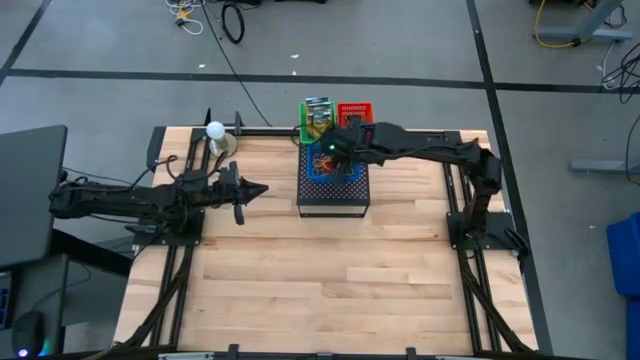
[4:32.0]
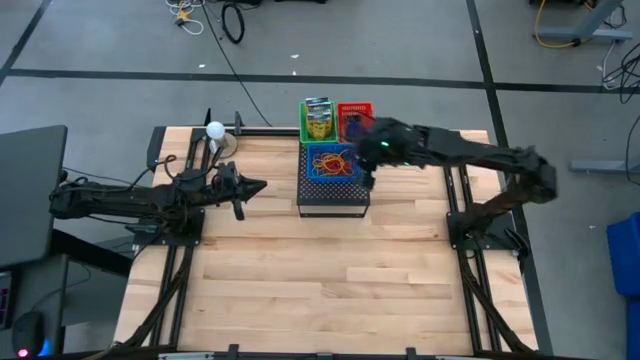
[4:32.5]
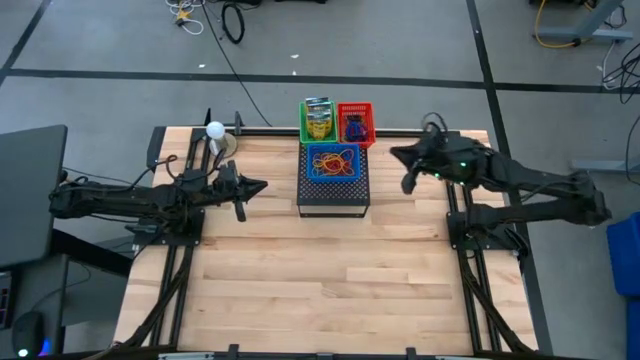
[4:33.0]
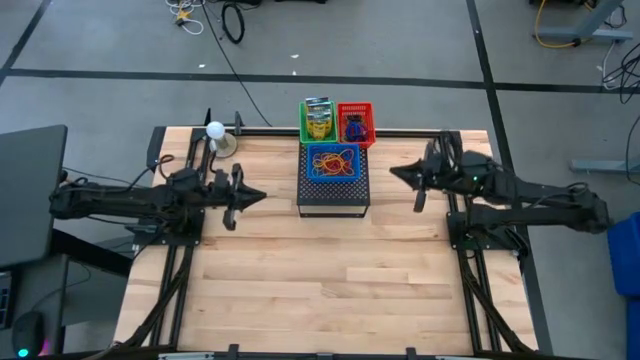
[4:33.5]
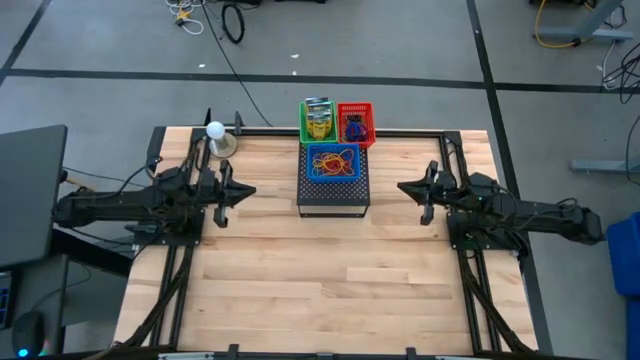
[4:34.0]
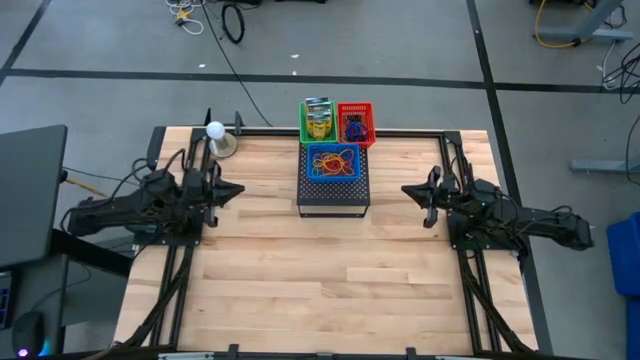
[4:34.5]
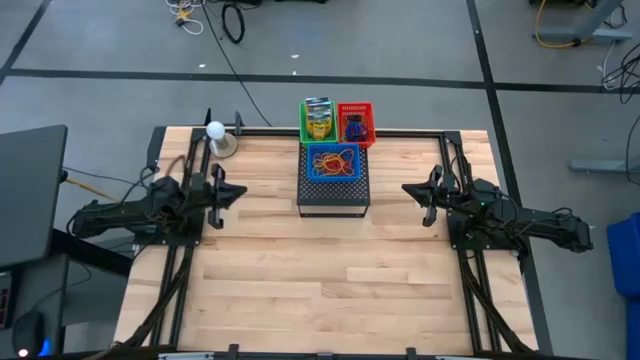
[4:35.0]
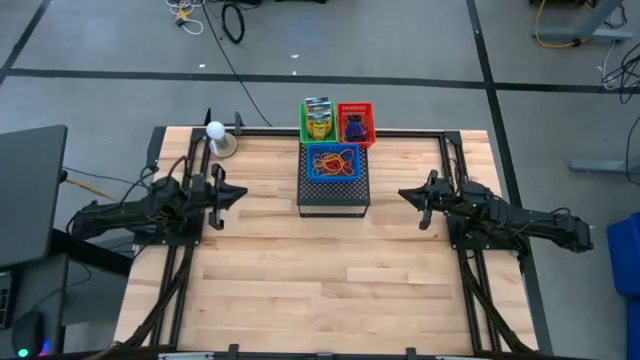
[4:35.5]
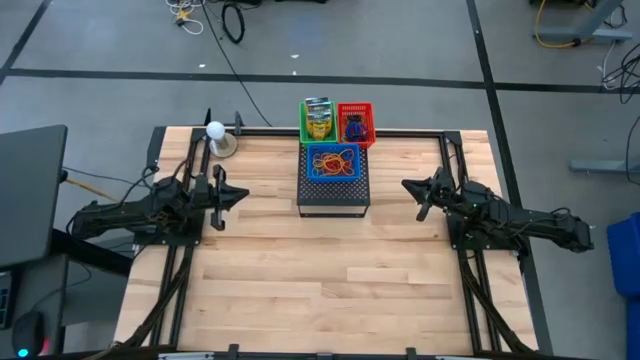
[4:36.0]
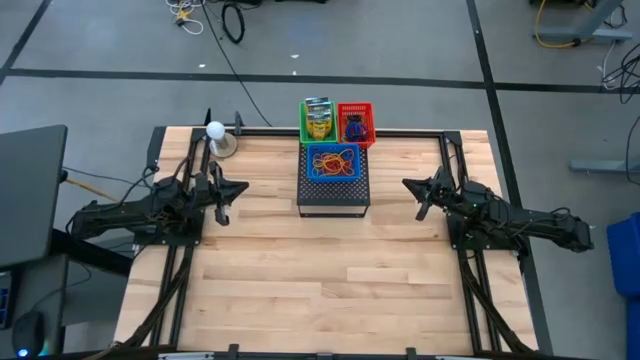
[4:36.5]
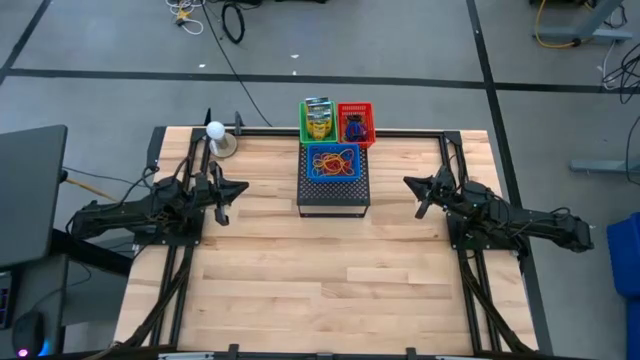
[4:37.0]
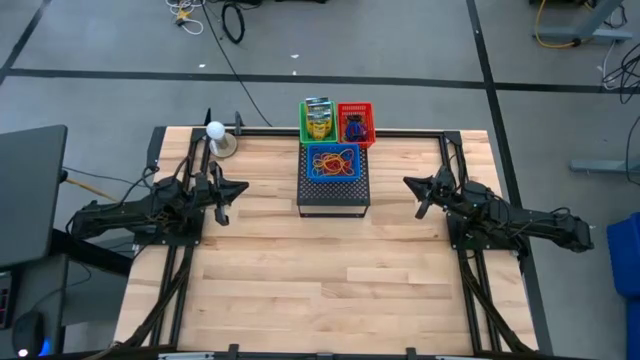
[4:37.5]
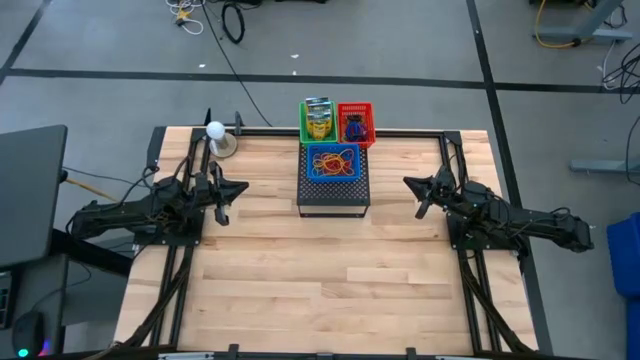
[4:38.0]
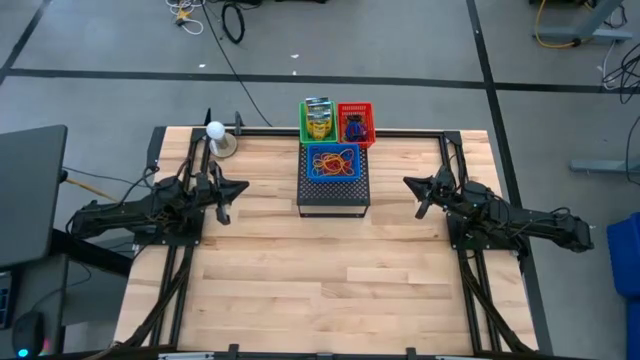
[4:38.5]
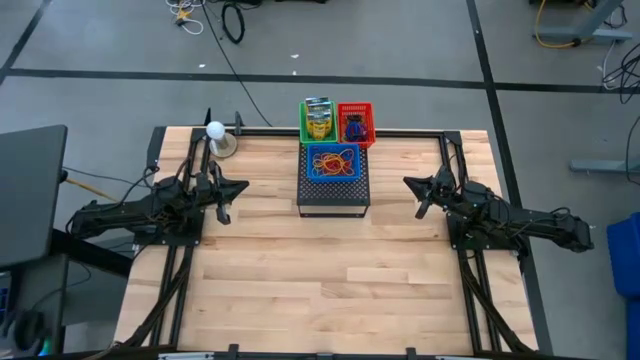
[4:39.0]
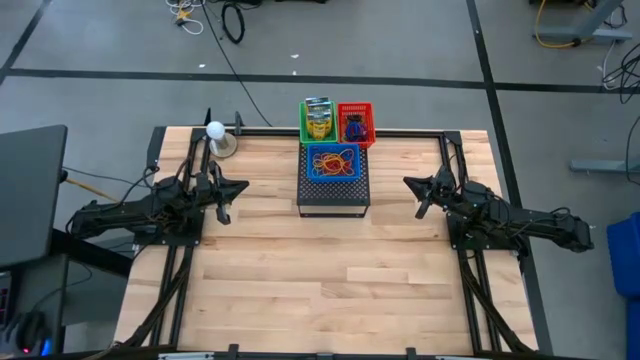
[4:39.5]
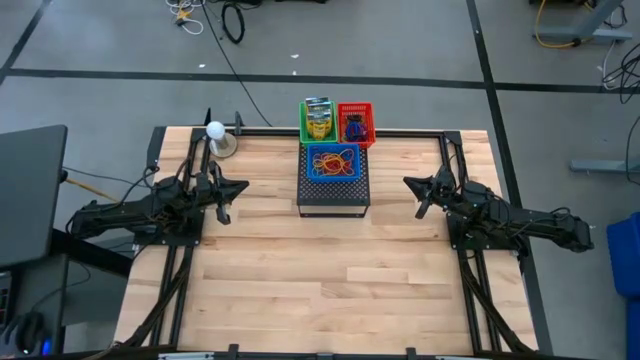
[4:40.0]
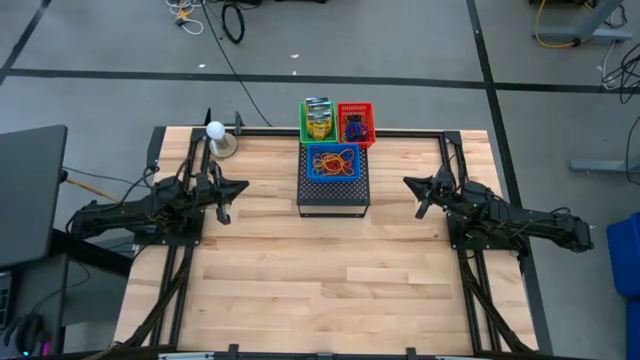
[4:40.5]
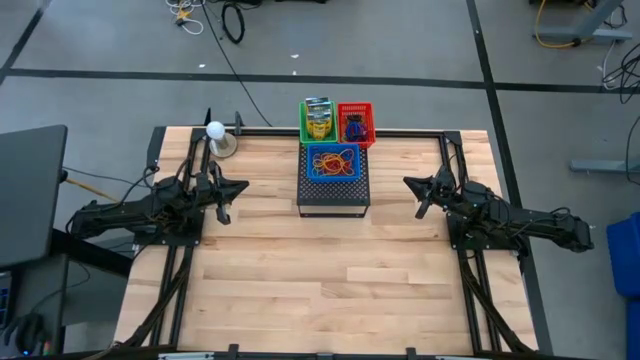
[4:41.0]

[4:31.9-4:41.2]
Task: Pick & Place Office Desk Supplies
Return to Home Position

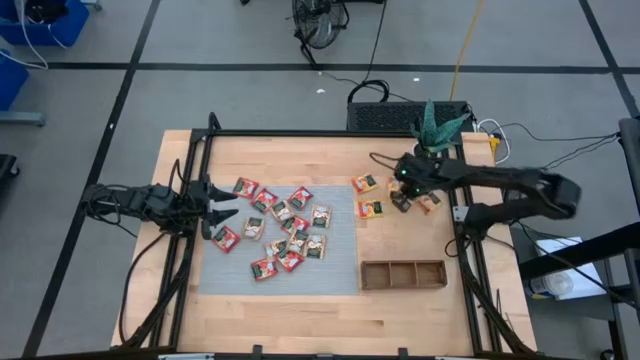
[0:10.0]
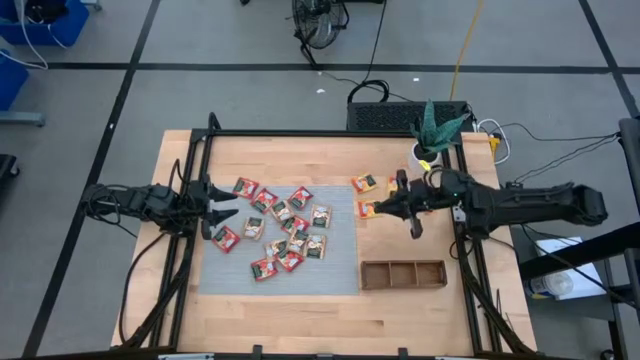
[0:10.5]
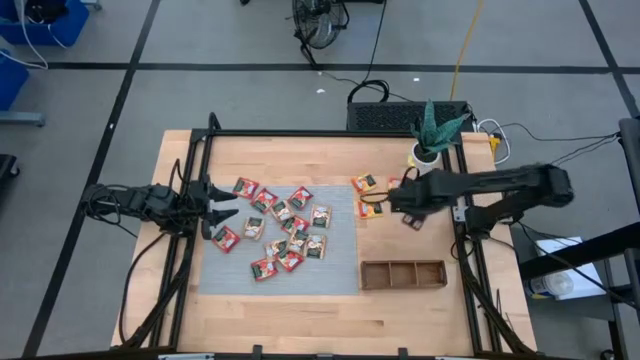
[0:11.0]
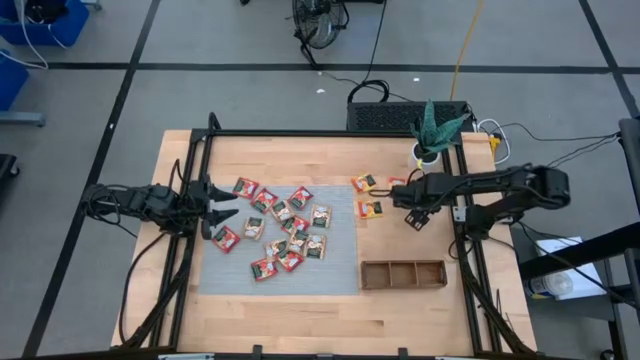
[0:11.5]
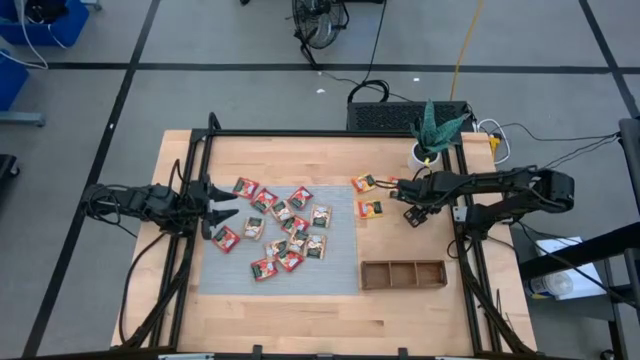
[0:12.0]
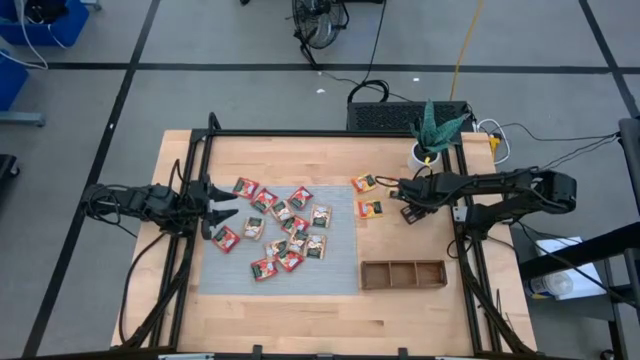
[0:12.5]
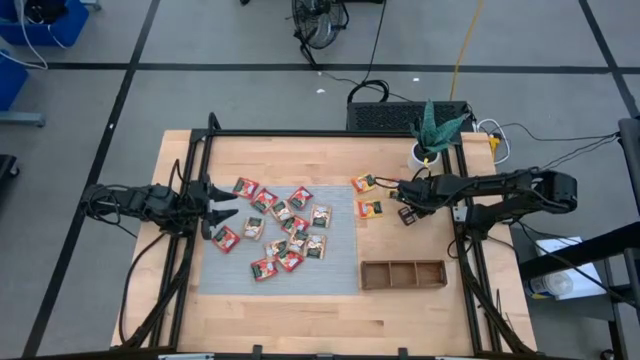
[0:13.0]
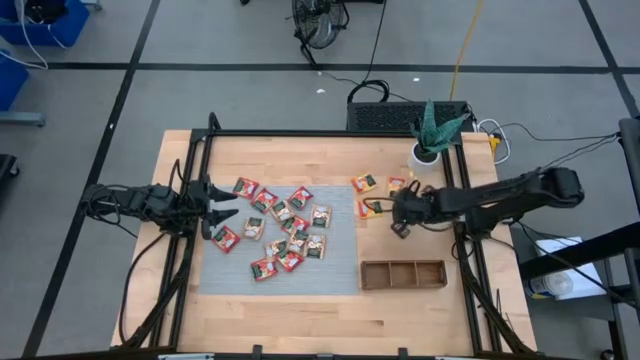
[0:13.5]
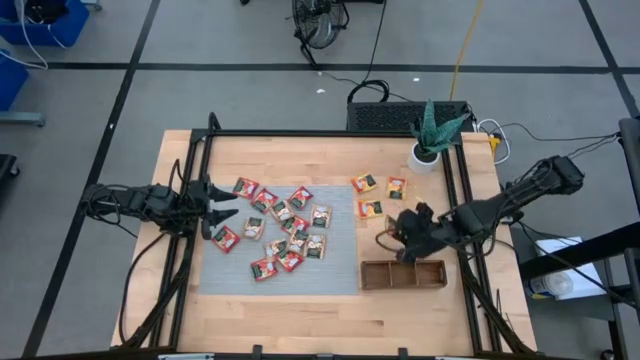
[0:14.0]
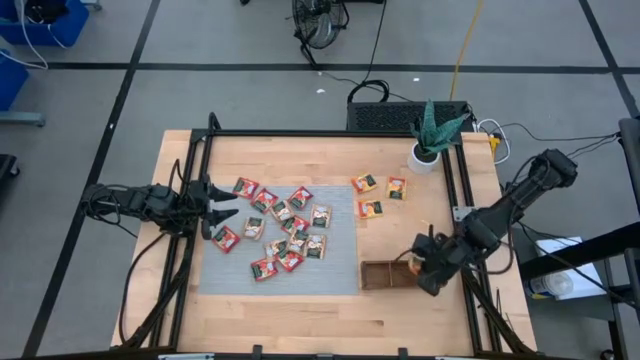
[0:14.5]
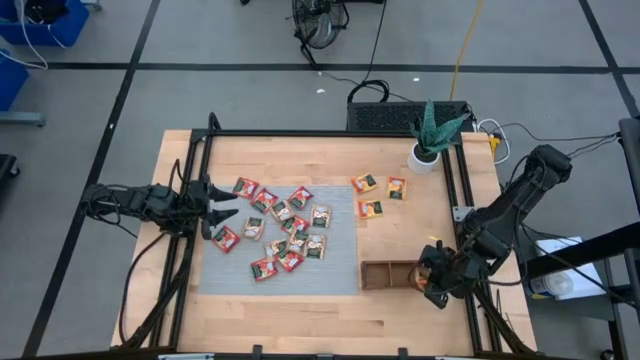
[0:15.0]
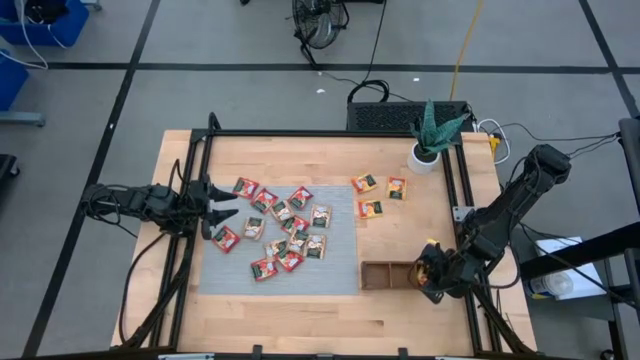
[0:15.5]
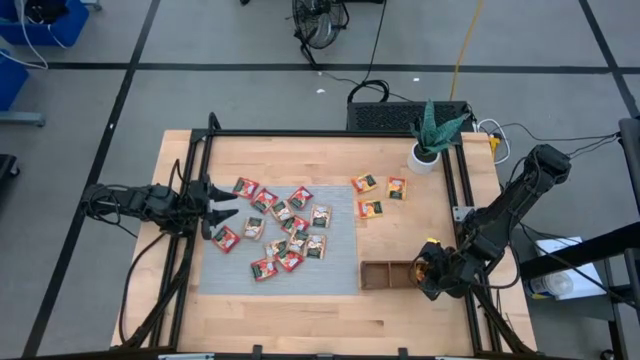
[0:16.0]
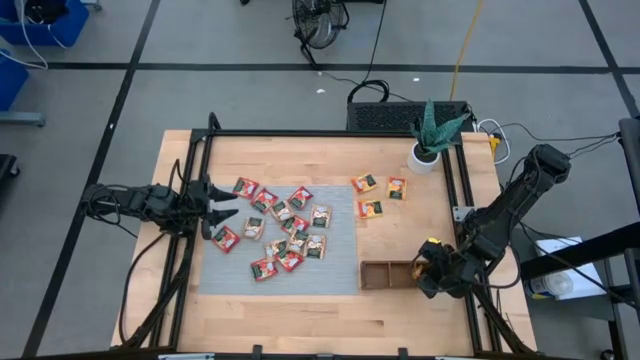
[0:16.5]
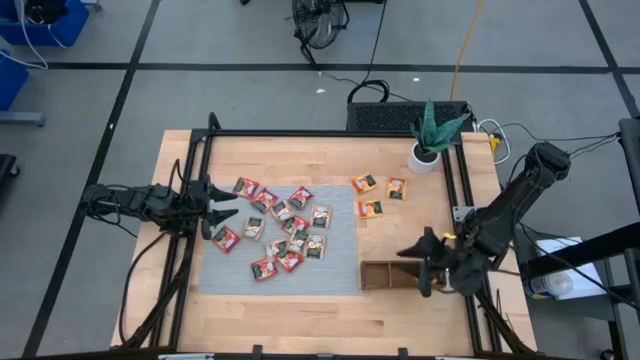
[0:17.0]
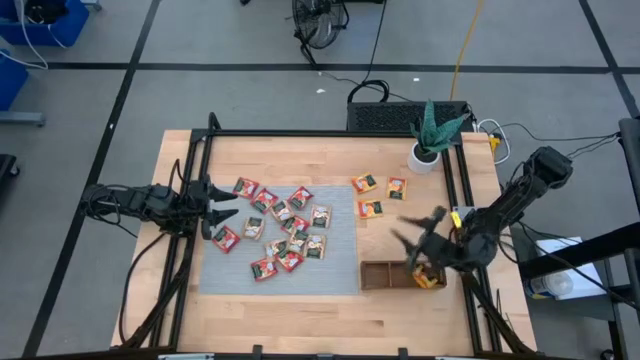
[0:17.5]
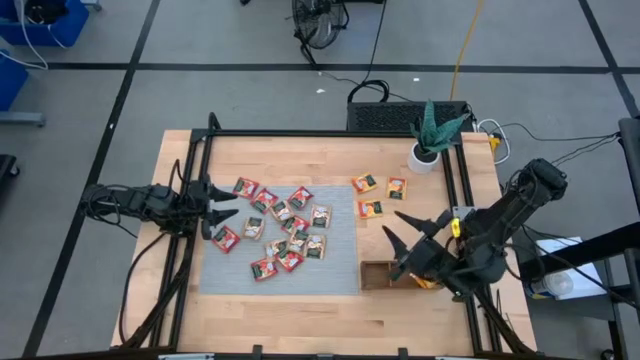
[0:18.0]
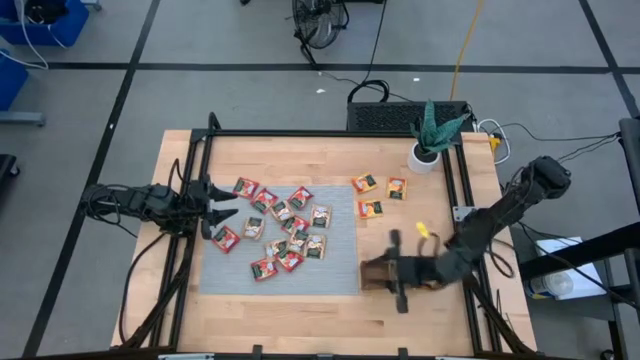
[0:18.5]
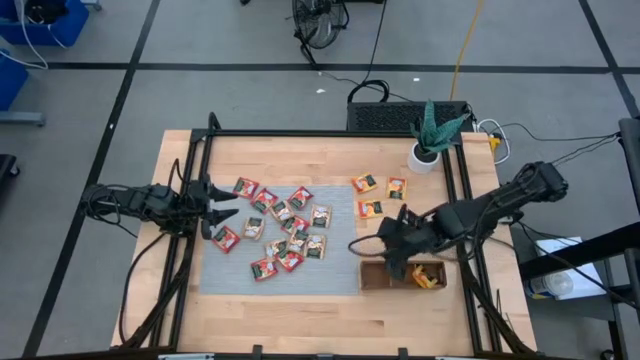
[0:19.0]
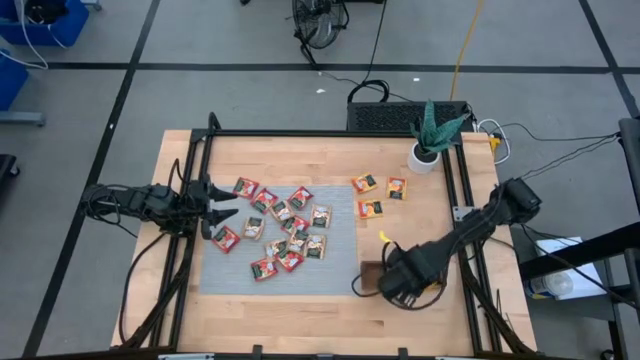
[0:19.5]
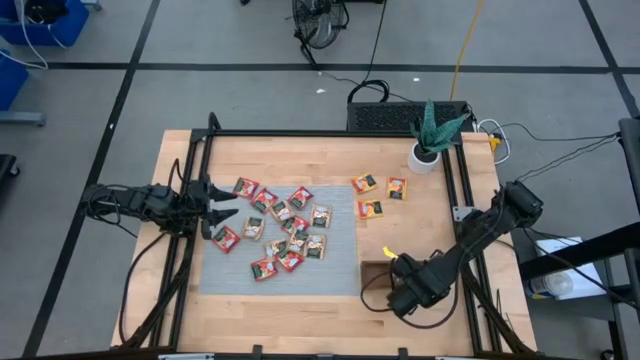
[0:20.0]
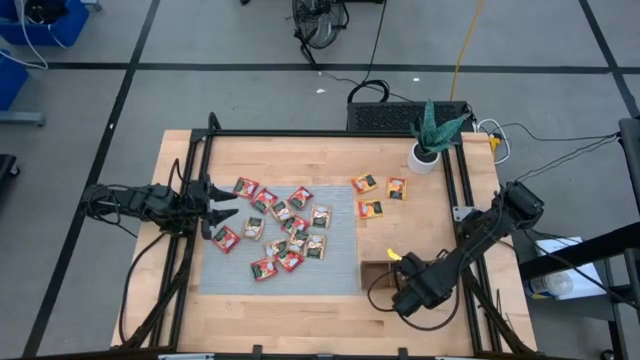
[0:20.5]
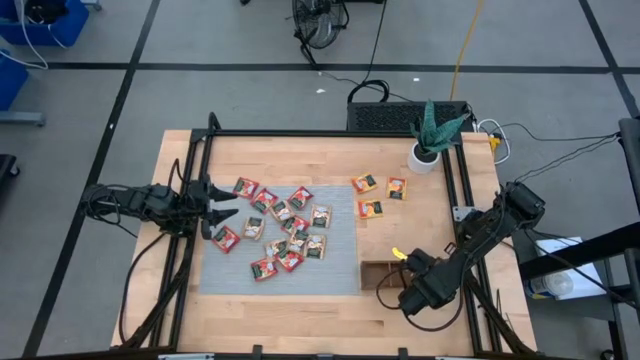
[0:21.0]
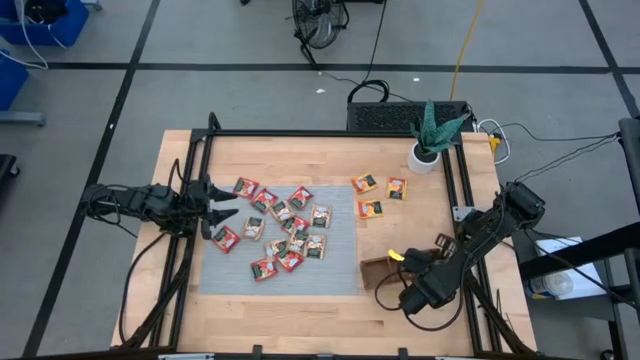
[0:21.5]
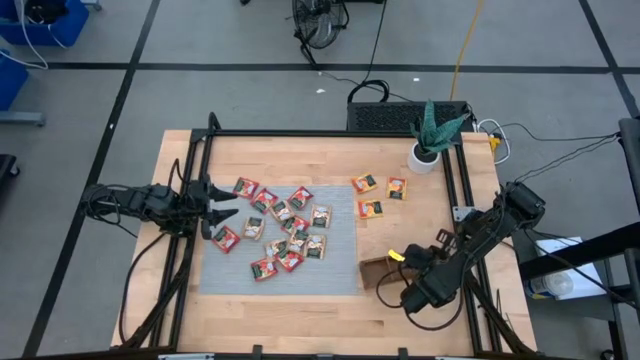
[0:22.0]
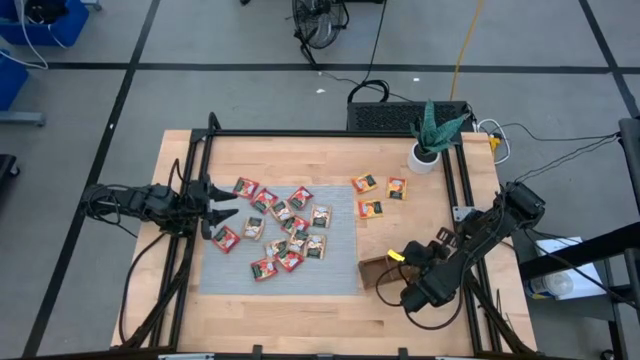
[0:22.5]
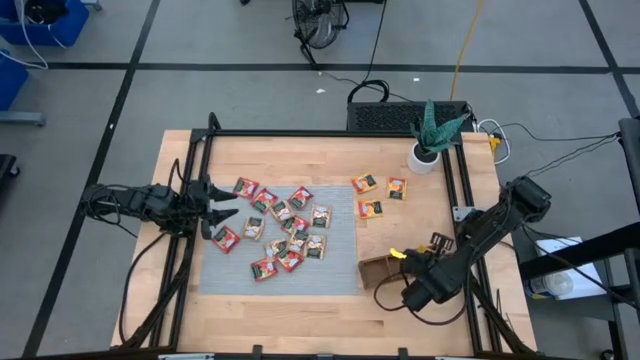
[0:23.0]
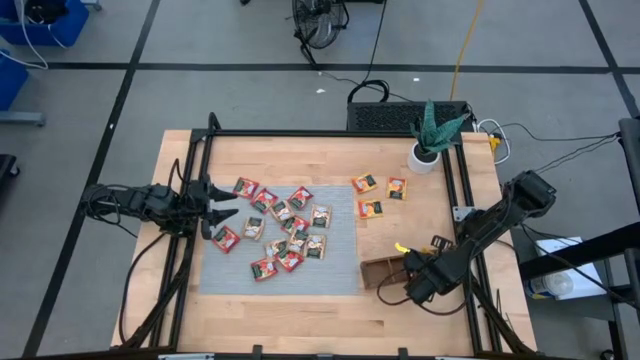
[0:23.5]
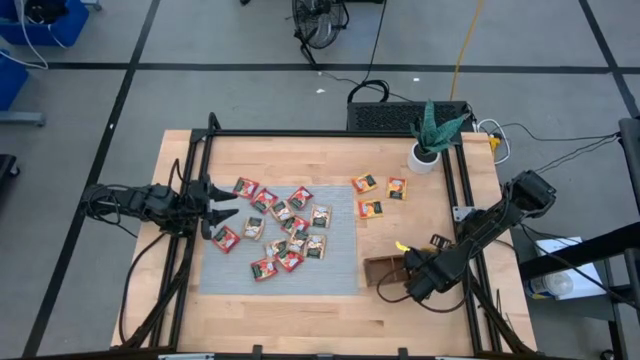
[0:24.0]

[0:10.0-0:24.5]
Task: Pick & Place Tea
Put the yellow tea bag into the right section of the wooden organizer
